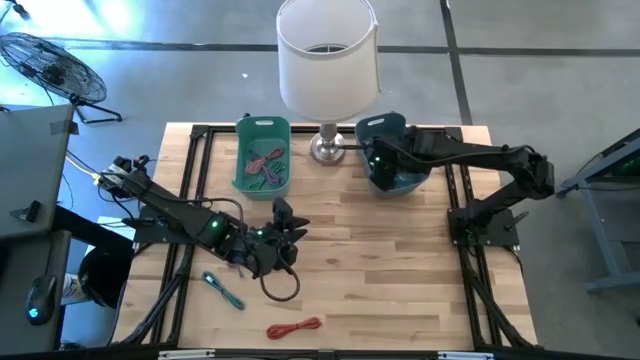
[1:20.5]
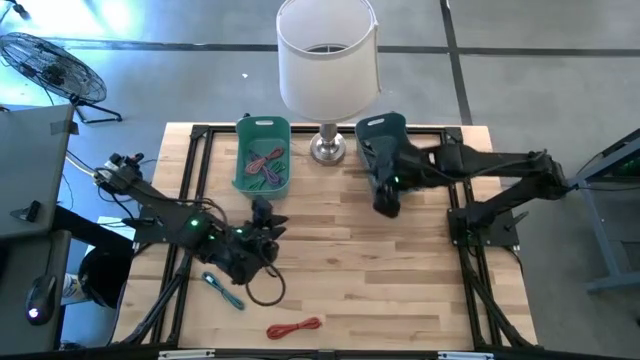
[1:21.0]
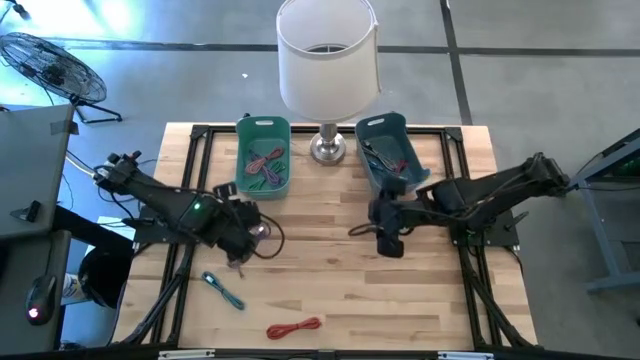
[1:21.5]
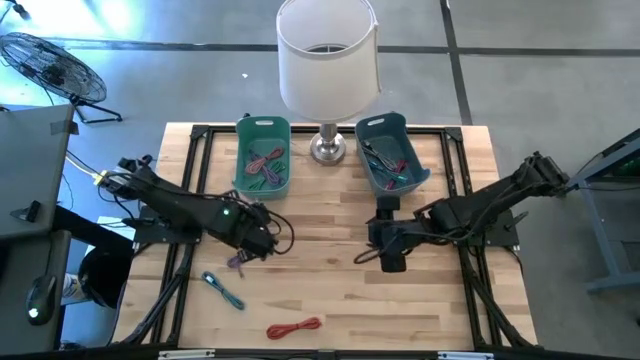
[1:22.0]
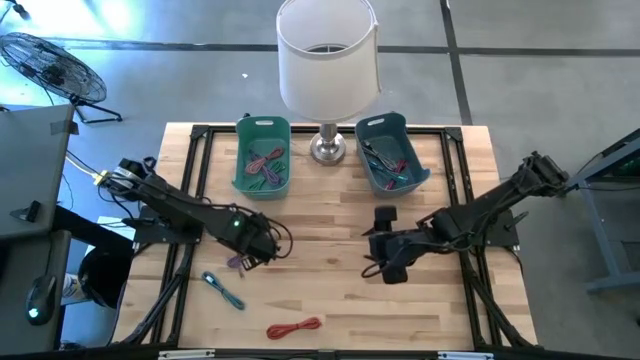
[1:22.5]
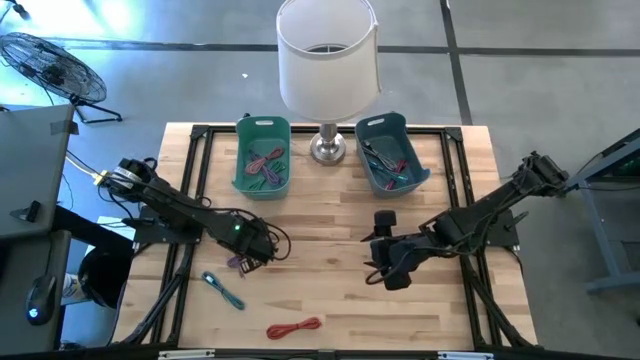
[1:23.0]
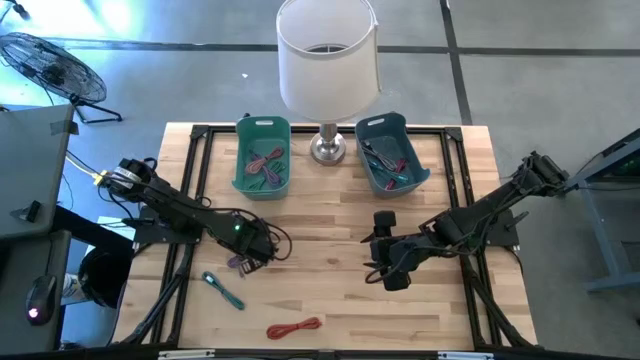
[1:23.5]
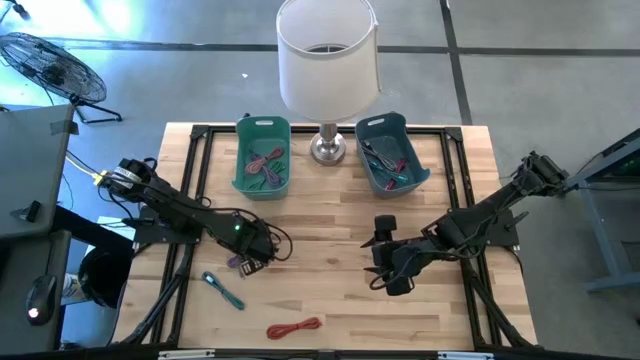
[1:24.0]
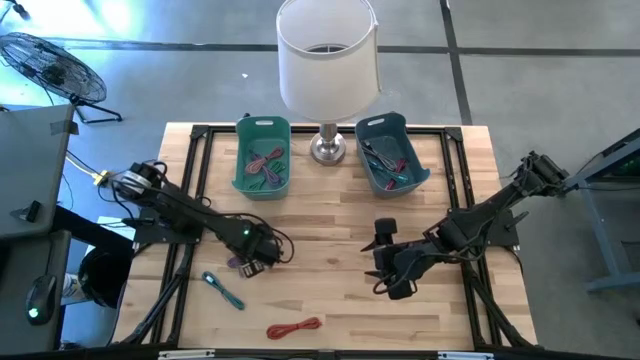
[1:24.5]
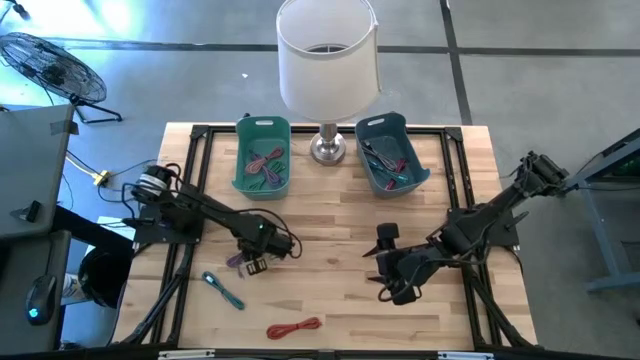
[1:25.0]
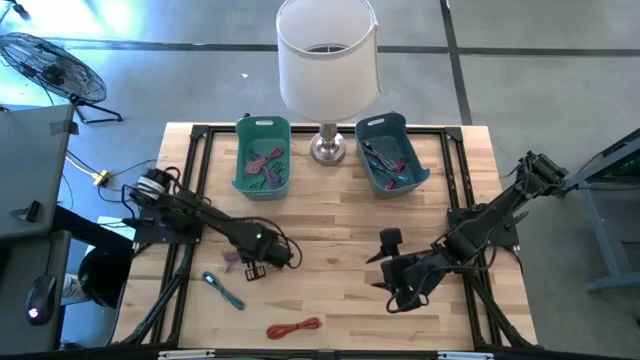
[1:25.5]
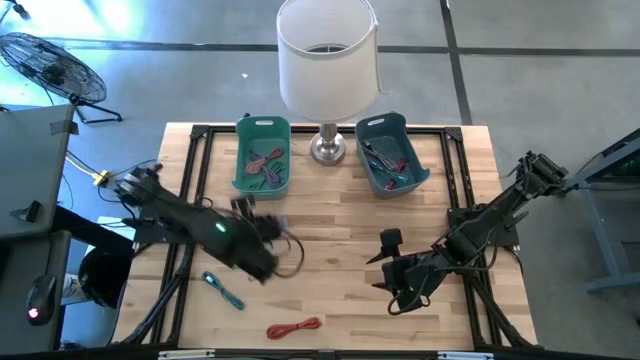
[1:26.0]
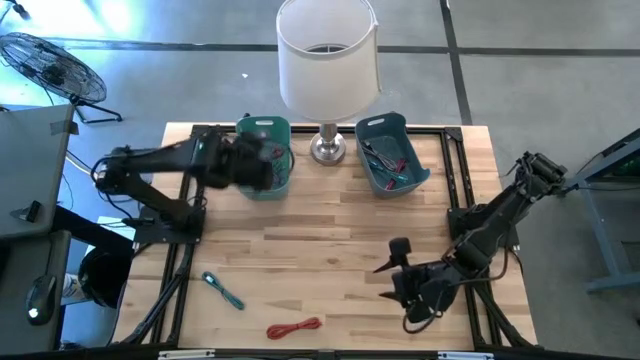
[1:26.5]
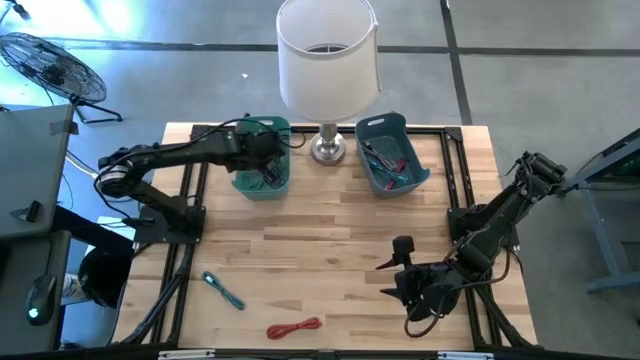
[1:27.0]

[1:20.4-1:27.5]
Task: Pick & Place USB Port
Put the purple charger cable into the green bin

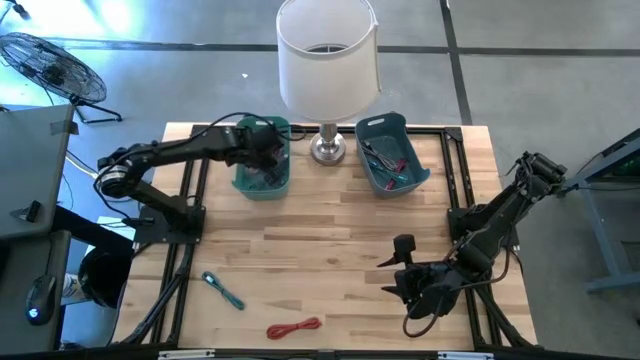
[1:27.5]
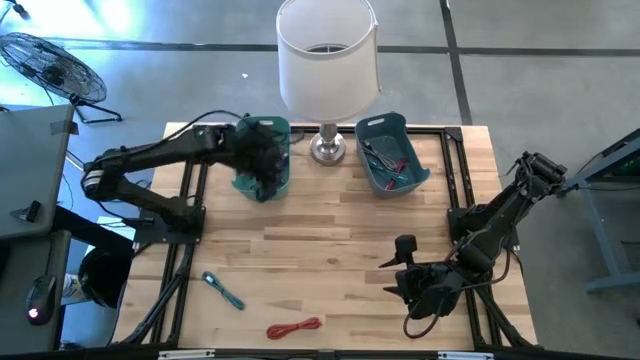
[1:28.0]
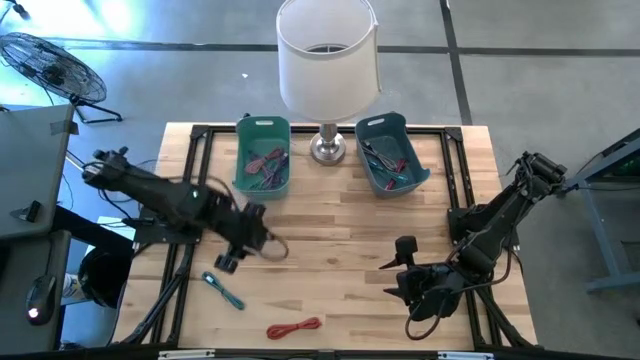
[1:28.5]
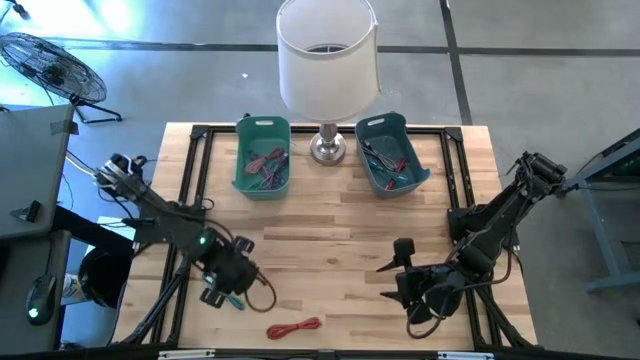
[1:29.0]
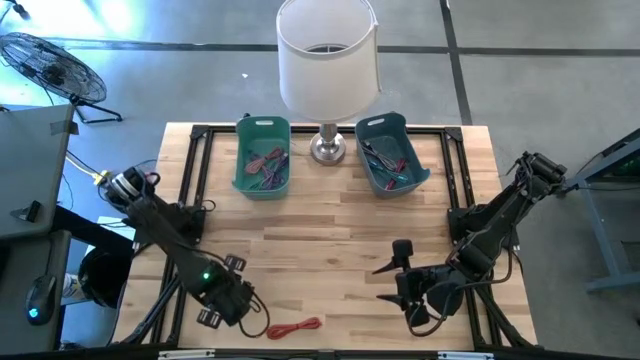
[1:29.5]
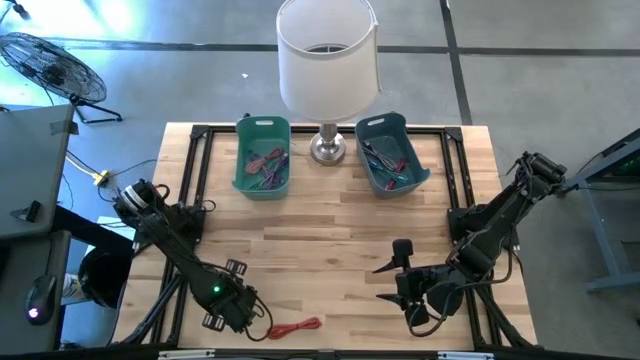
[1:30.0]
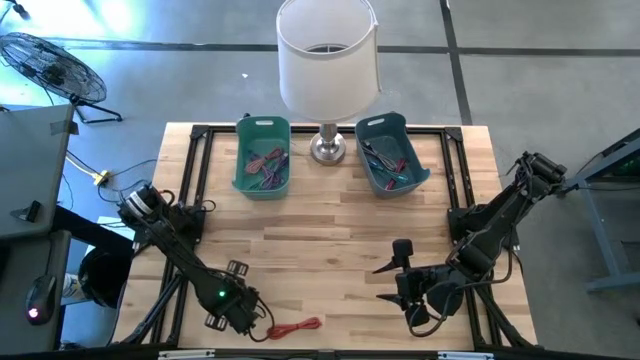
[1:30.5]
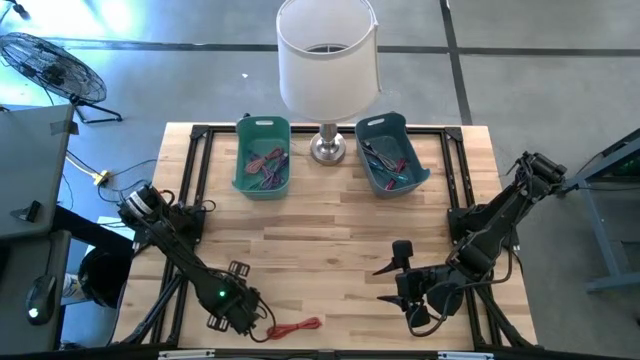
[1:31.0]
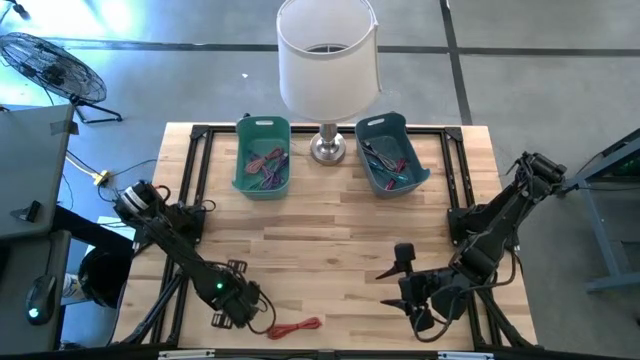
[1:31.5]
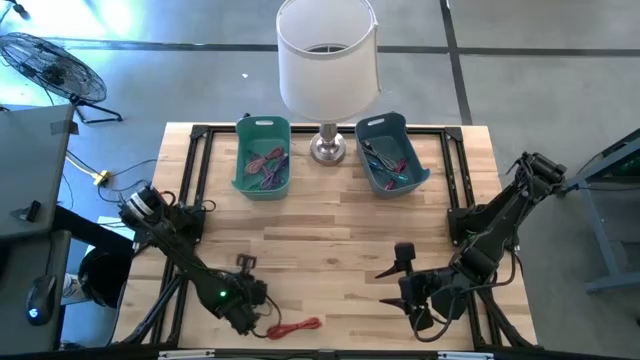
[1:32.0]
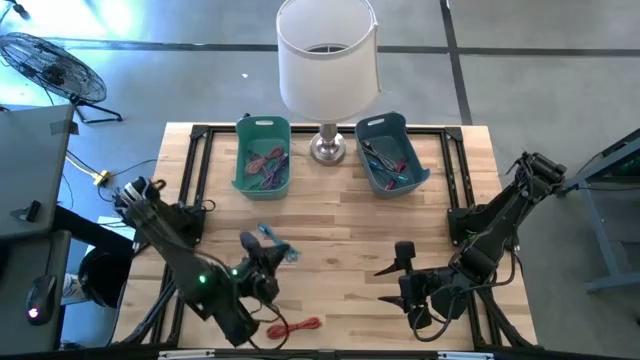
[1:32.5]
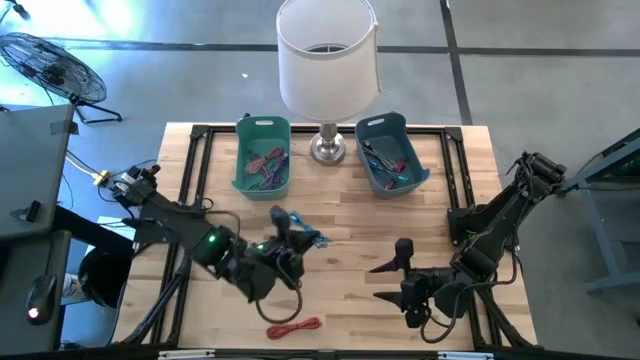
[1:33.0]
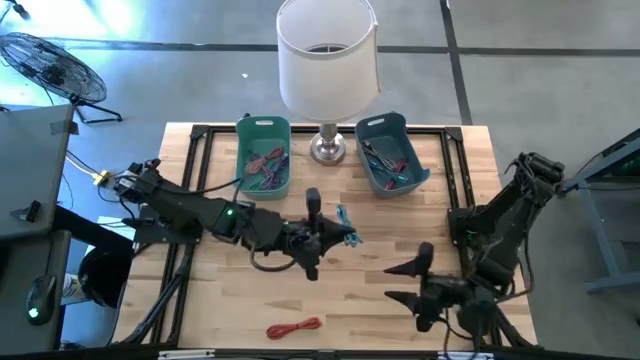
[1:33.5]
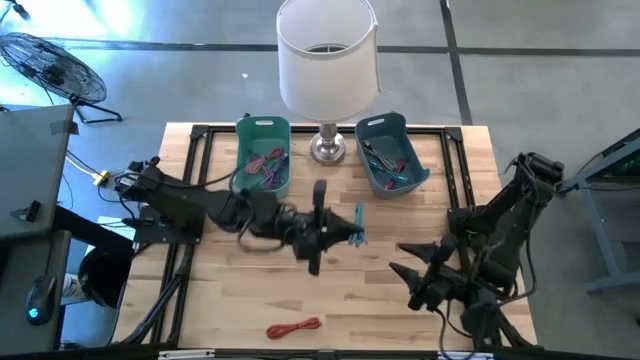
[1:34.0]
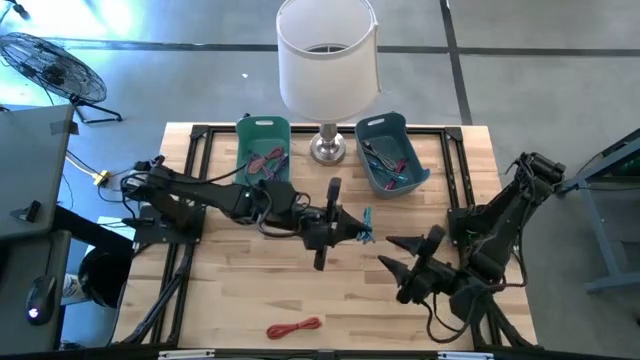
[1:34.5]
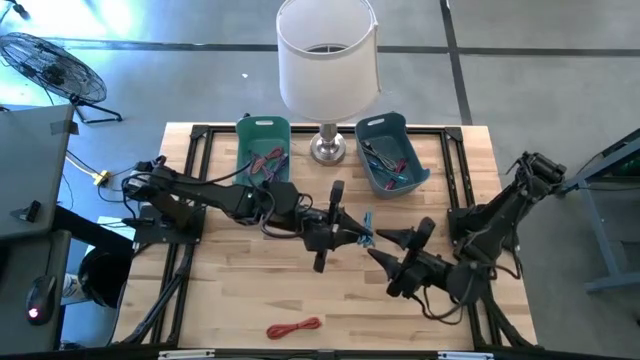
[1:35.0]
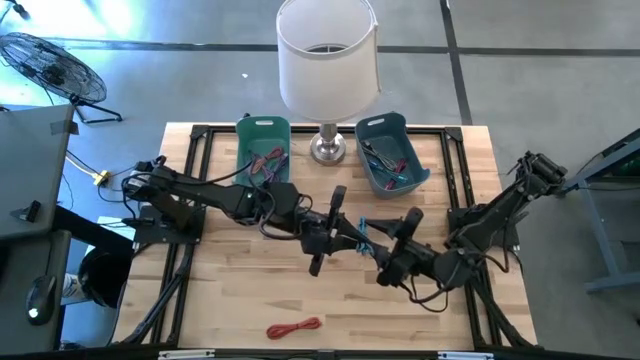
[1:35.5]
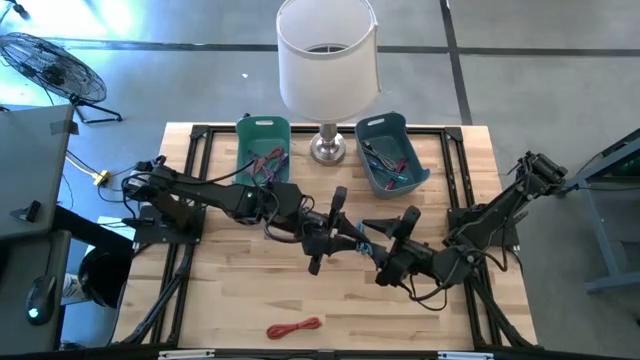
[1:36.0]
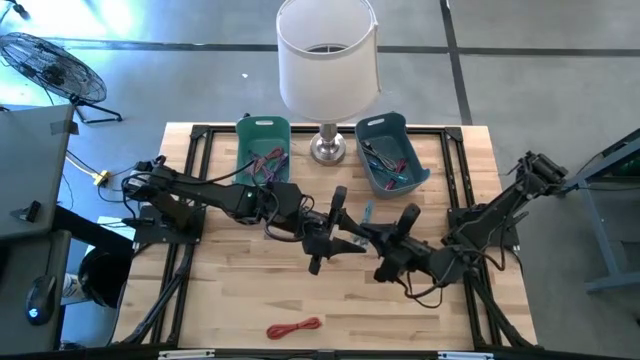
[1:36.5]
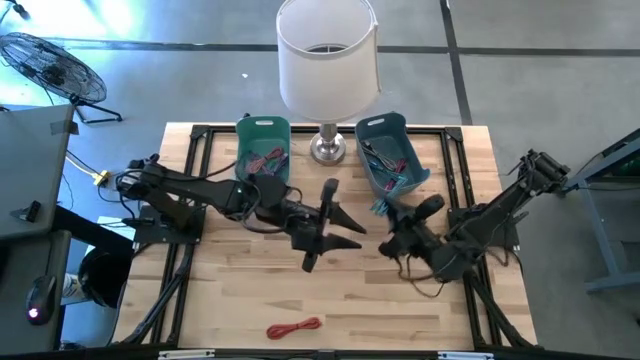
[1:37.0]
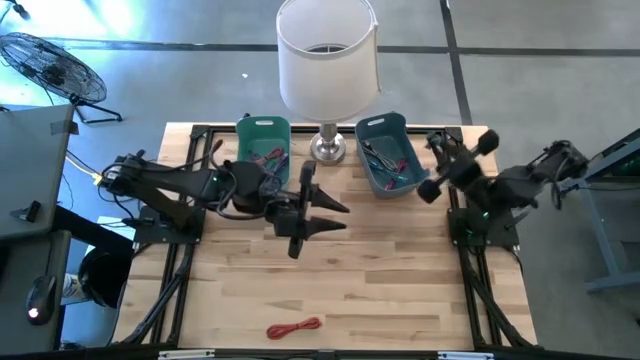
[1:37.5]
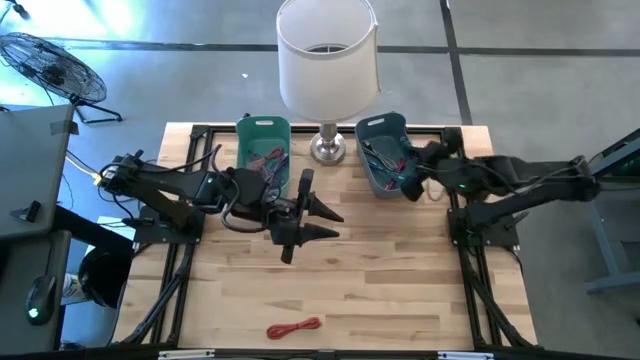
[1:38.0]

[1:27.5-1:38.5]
Put the blue patterned charger cable into the blue bin

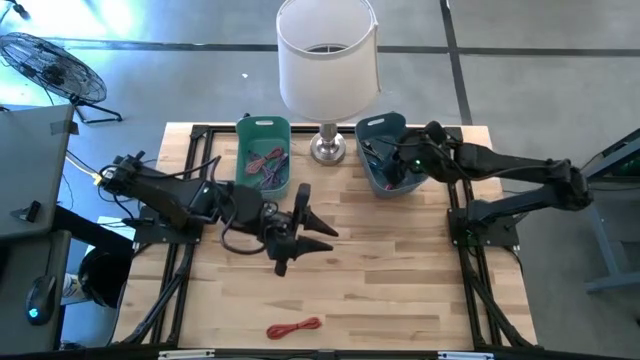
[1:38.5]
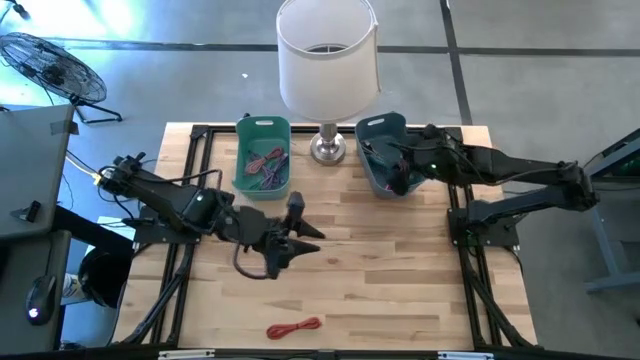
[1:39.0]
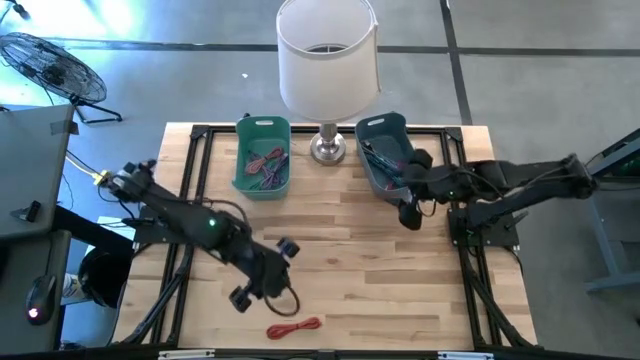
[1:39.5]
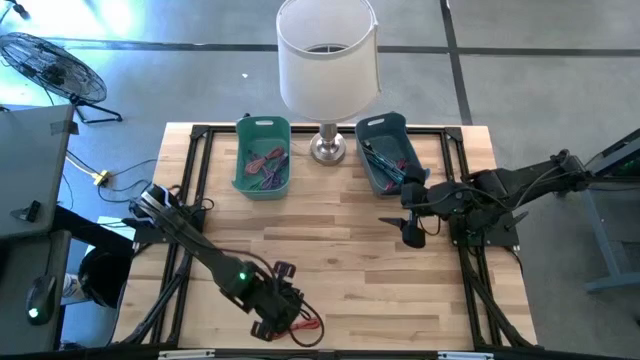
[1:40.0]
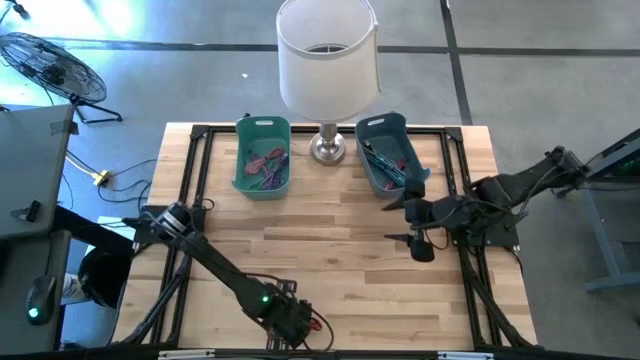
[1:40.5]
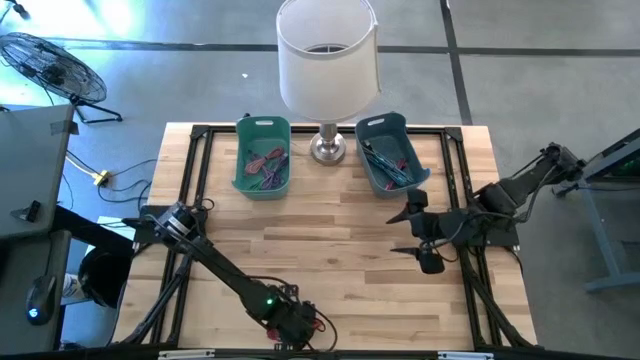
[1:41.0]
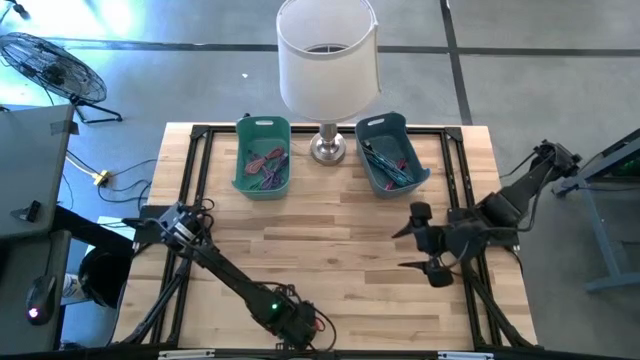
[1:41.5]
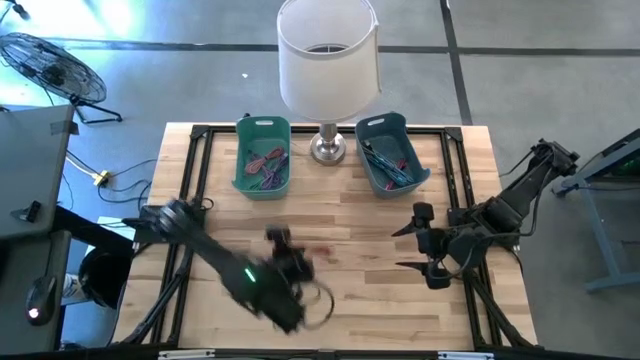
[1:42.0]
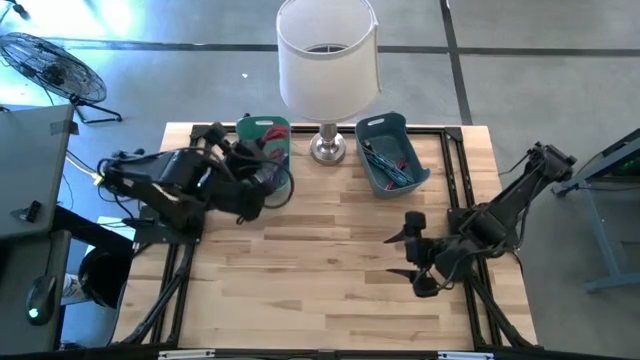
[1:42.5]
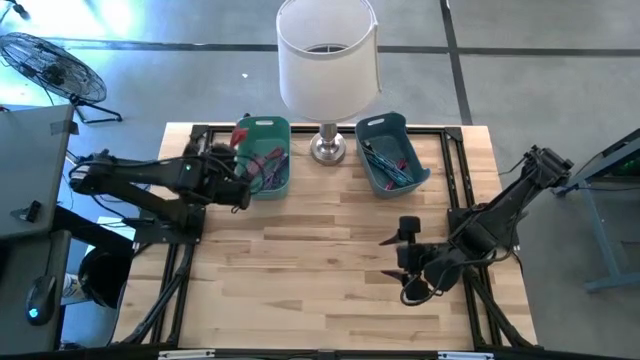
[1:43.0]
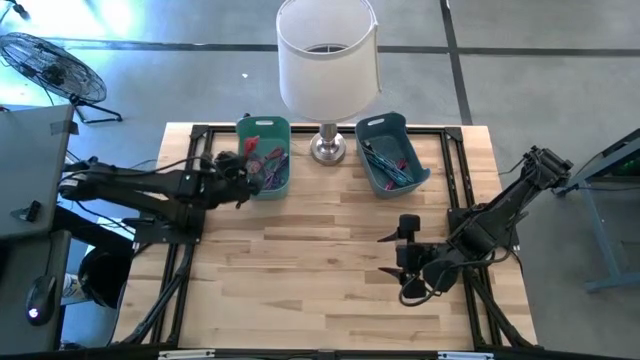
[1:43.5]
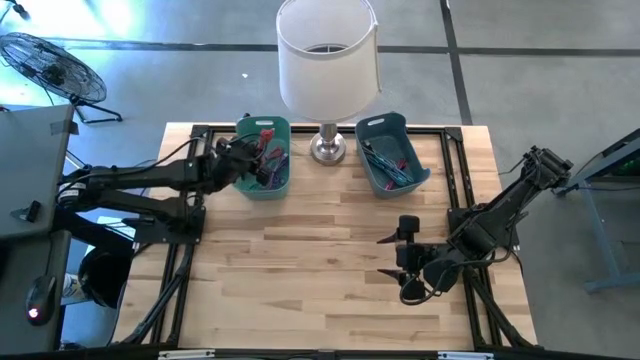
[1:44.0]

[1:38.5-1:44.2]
Put the red charger cable into the green bin
